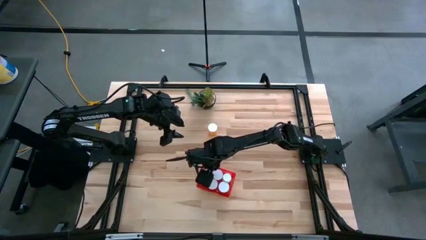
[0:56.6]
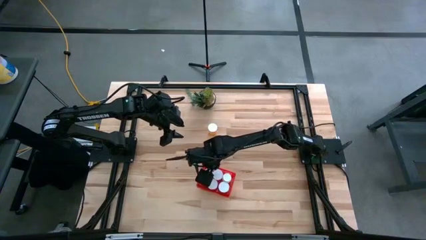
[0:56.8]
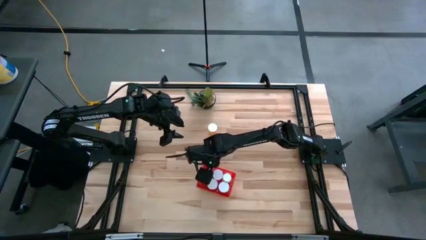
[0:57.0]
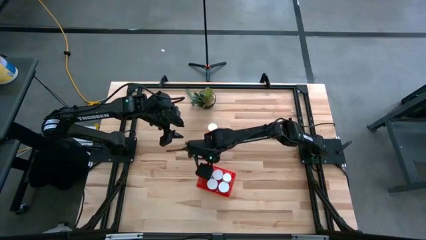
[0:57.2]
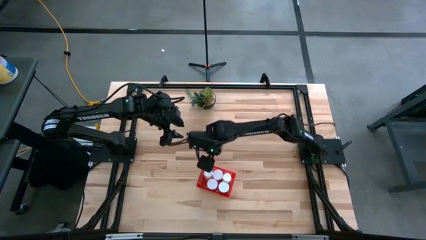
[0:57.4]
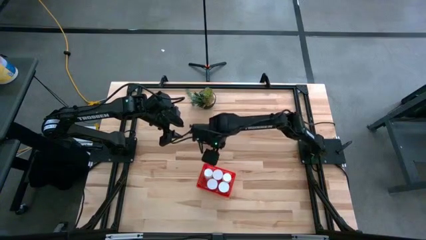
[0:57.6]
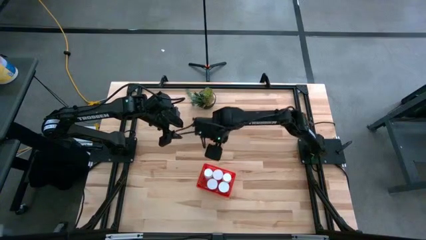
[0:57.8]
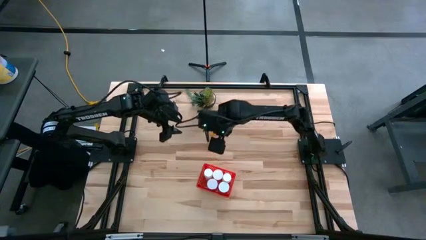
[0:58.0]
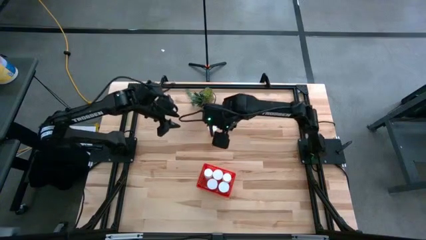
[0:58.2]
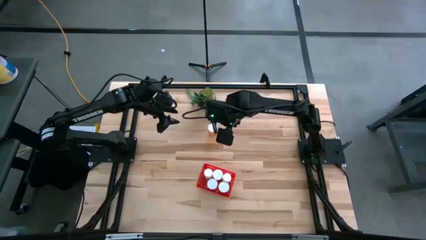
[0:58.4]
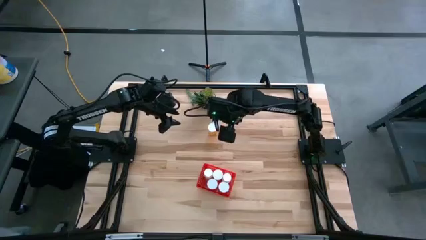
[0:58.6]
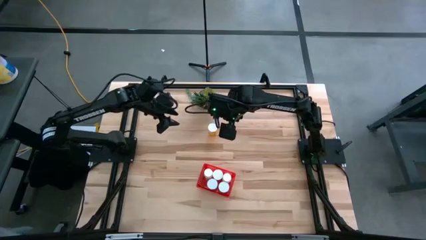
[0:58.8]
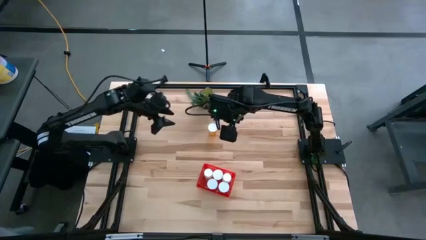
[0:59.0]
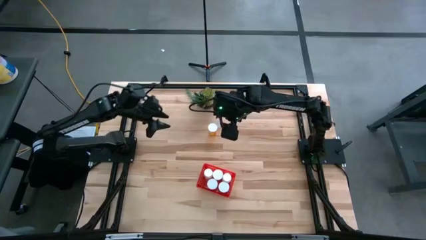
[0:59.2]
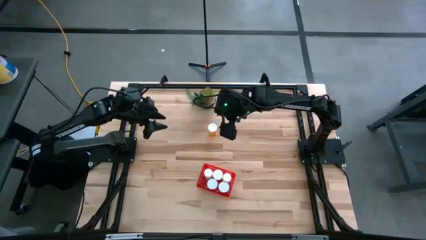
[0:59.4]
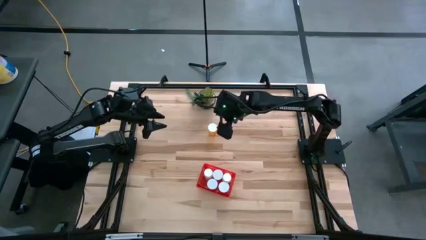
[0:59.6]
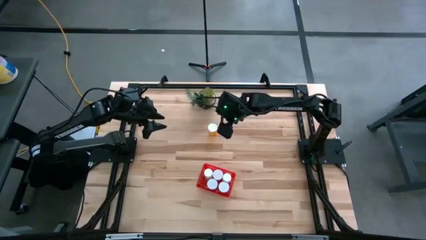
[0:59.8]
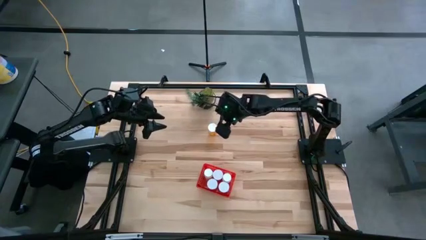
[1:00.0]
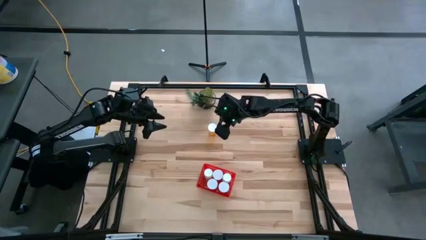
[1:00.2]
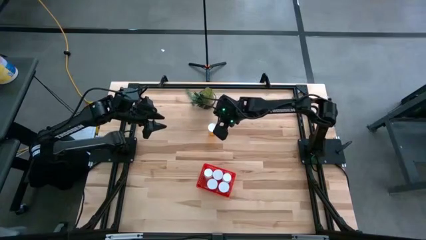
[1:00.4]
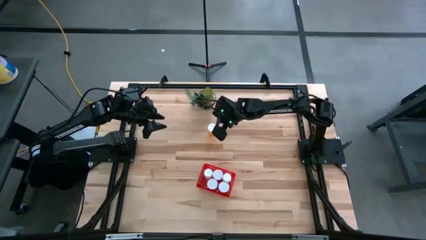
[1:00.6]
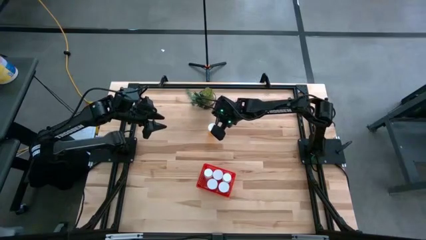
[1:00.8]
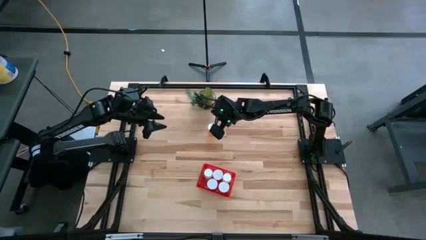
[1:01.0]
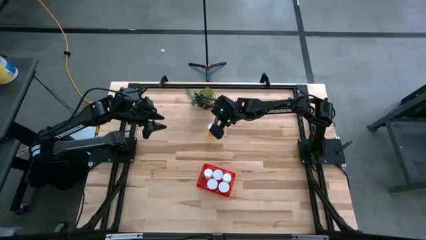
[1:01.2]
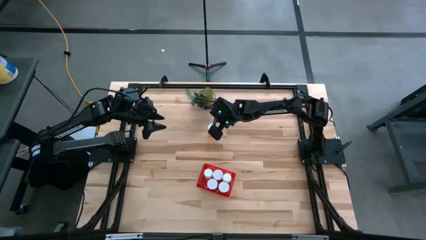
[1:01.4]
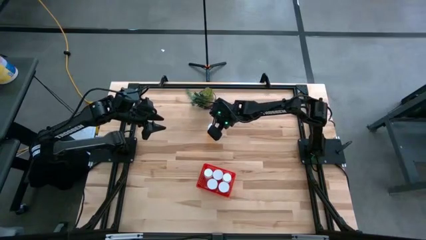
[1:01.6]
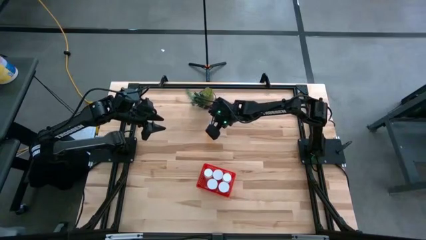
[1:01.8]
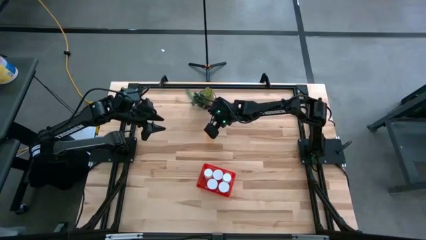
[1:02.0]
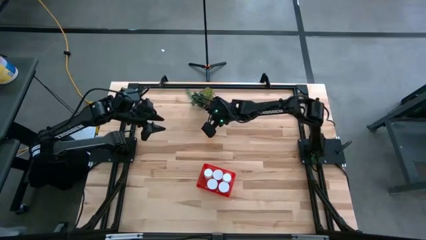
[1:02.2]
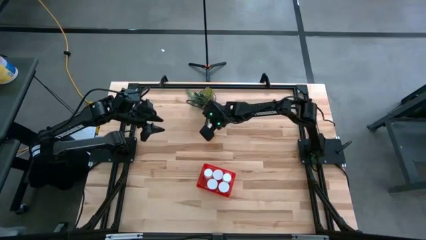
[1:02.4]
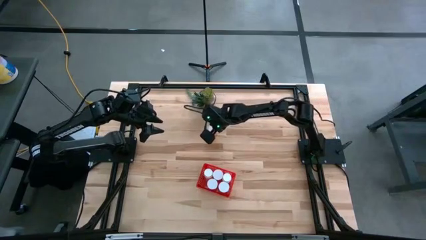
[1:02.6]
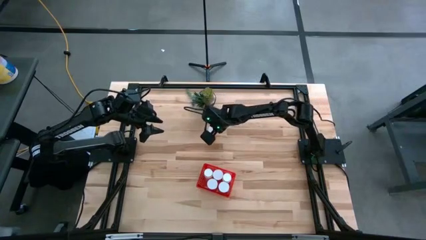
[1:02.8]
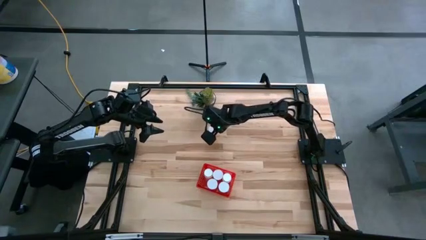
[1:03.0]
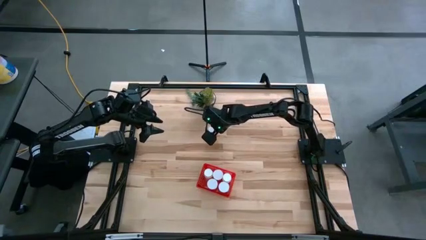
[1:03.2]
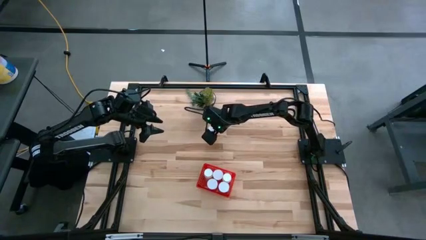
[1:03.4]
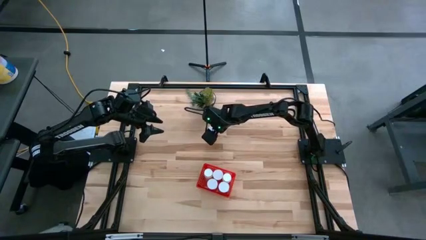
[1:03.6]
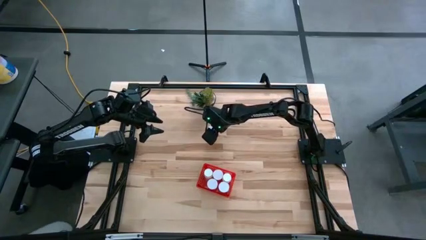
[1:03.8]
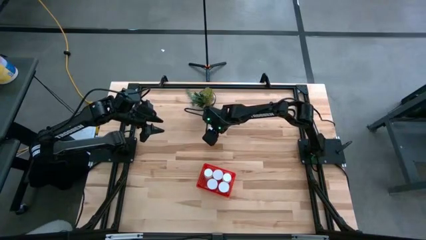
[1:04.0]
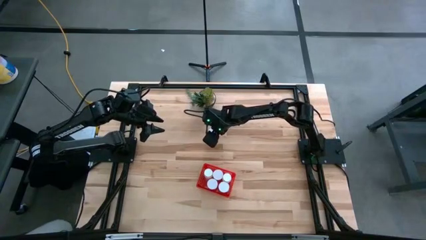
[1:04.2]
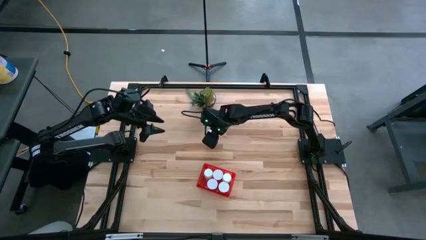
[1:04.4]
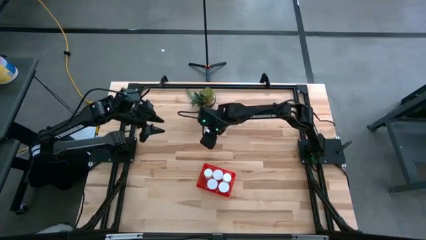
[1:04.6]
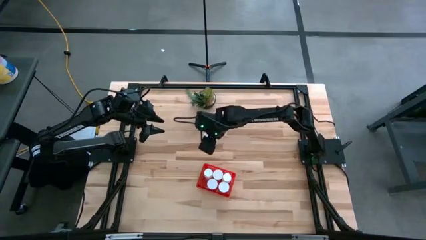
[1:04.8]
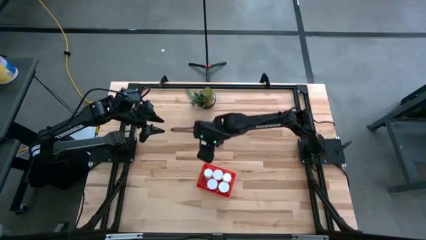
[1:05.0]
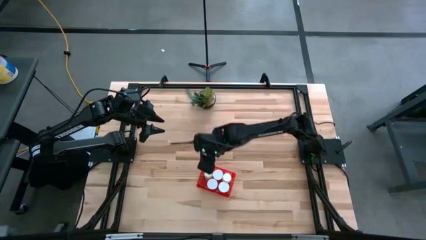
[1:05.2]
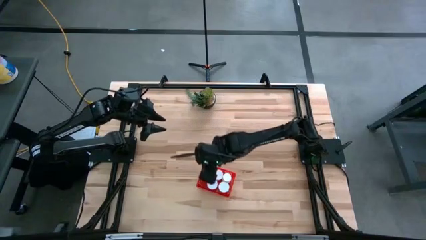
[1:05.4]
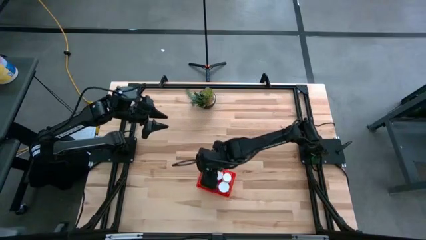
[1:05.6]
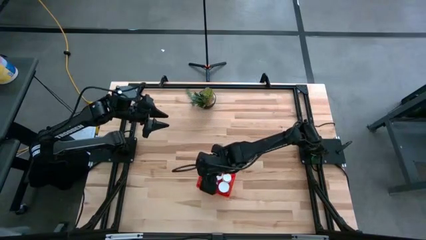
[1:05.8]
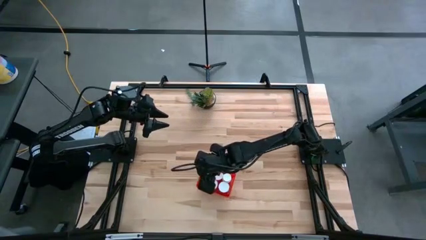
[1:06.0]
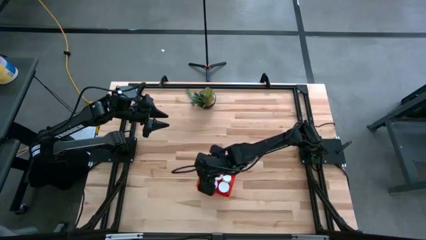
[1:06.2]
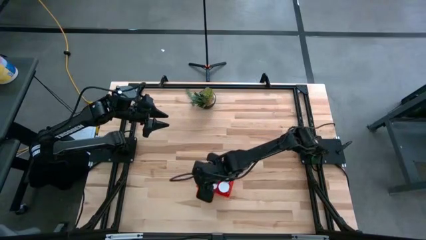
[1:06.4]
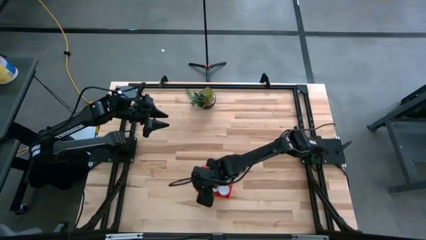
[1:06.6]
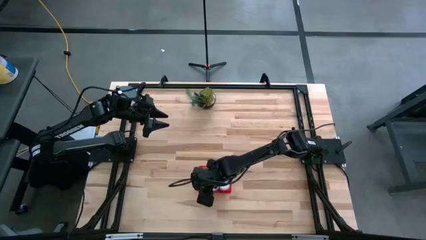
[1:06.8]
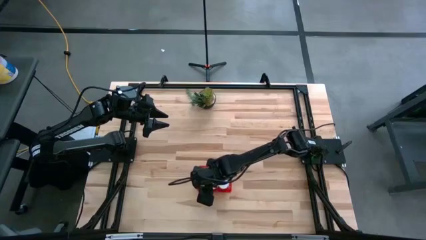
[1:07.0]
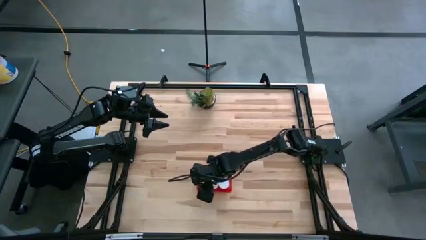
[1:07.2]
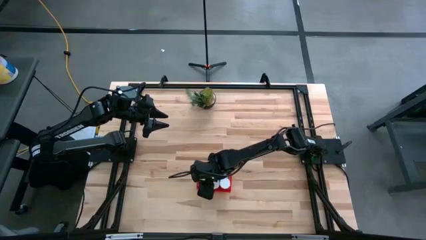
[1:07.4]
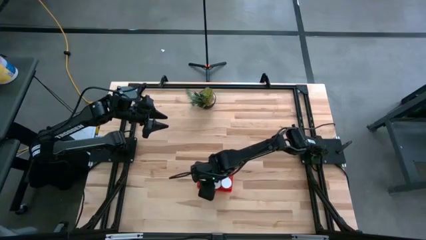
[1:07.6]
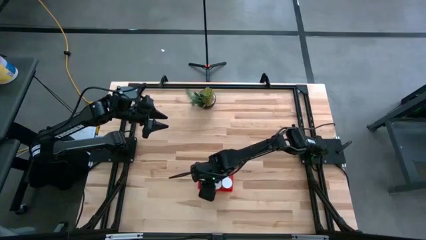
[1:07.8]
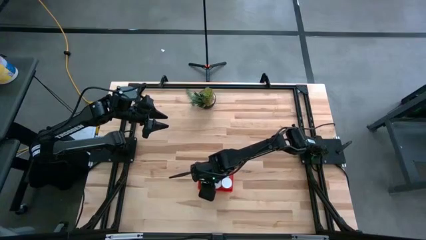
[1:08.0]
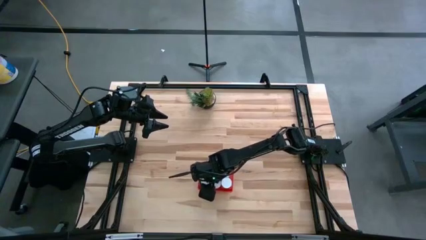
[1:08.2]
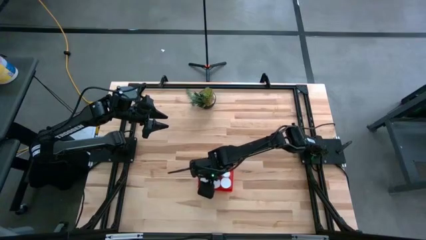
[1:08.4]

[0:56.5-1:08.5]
Task: Pick and place pill bottles into a basket
Put the orange pill bottle into the basket

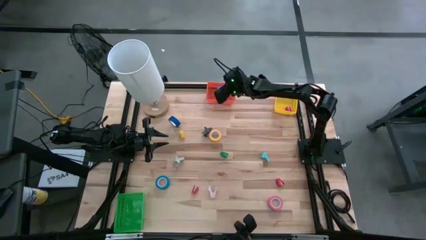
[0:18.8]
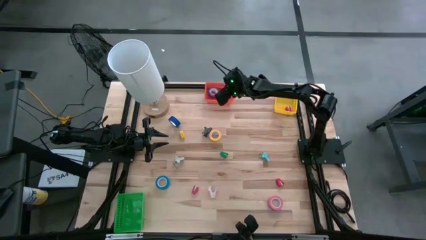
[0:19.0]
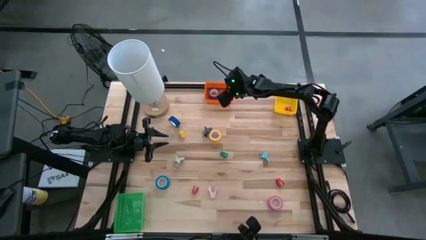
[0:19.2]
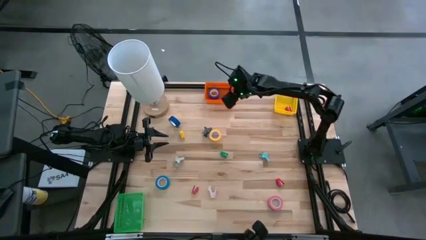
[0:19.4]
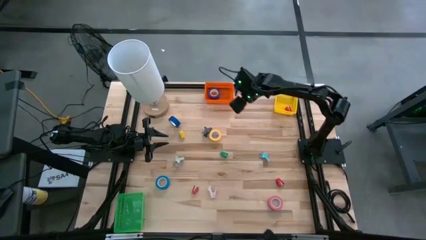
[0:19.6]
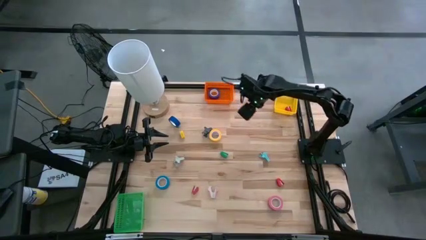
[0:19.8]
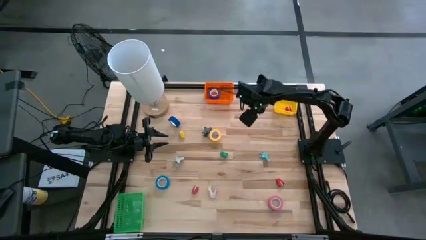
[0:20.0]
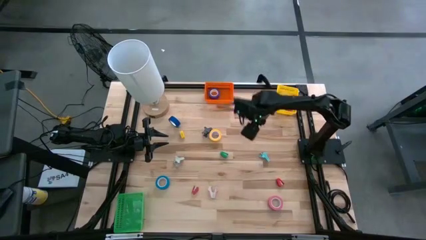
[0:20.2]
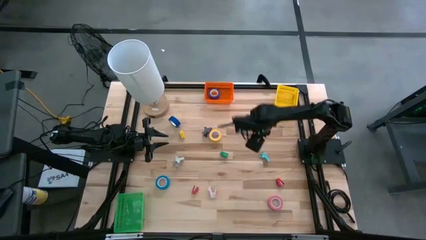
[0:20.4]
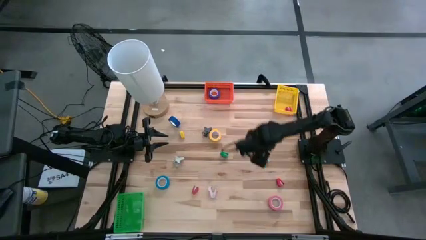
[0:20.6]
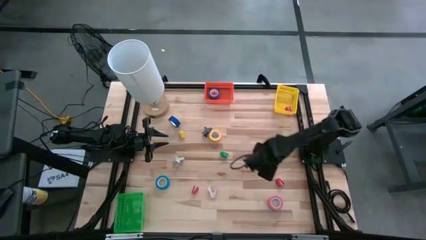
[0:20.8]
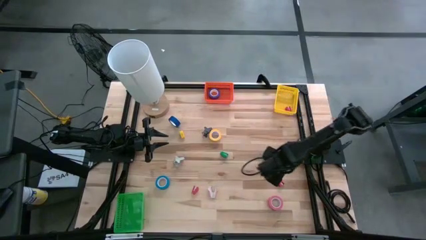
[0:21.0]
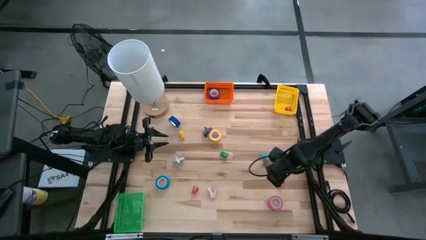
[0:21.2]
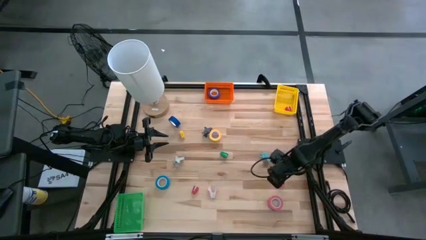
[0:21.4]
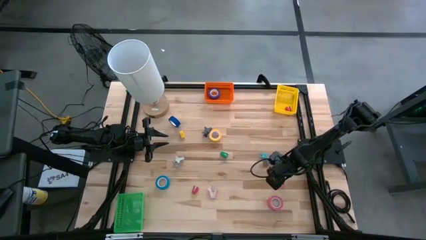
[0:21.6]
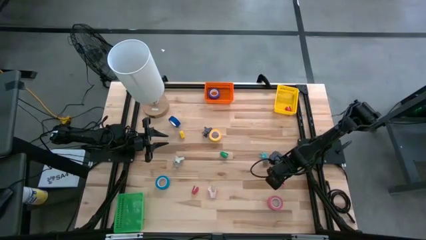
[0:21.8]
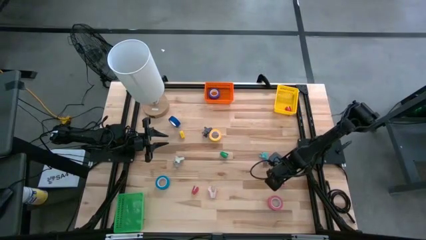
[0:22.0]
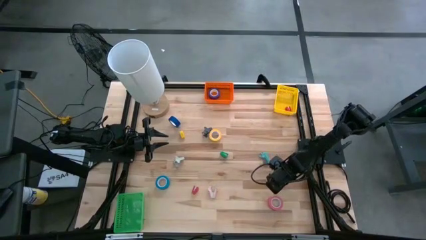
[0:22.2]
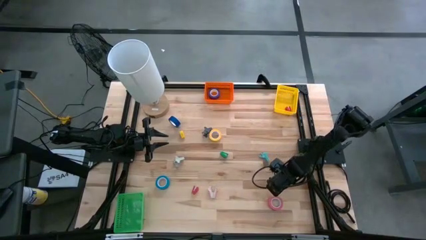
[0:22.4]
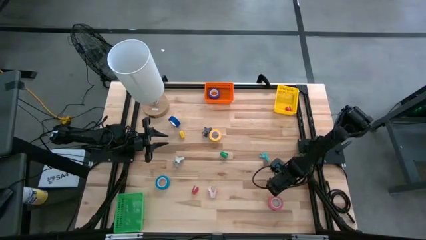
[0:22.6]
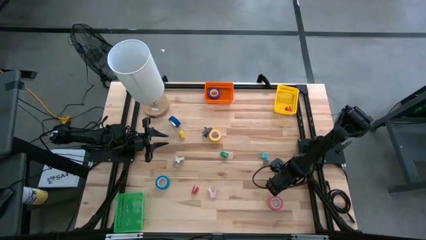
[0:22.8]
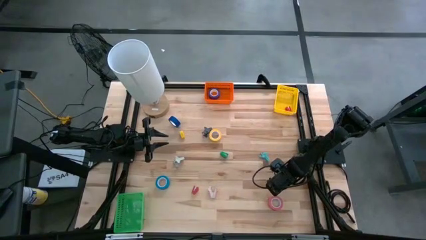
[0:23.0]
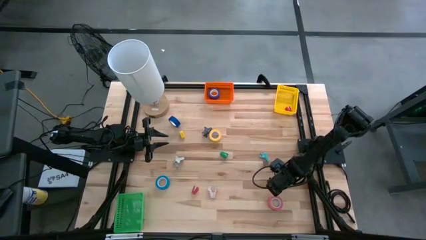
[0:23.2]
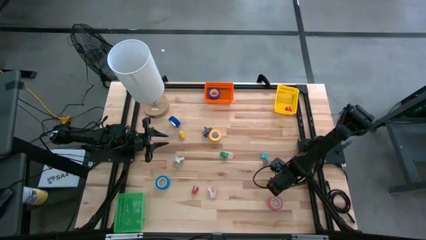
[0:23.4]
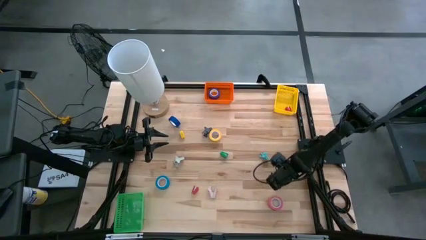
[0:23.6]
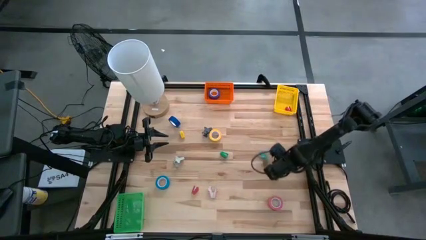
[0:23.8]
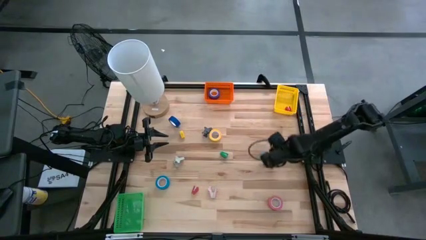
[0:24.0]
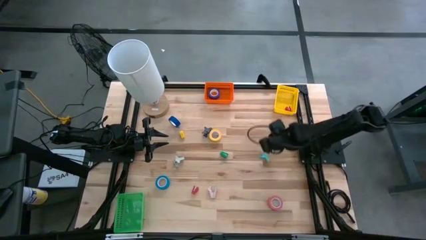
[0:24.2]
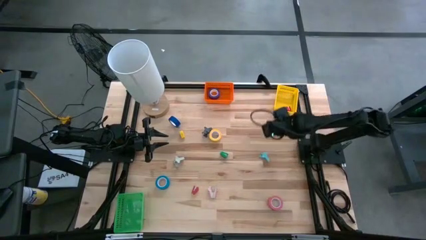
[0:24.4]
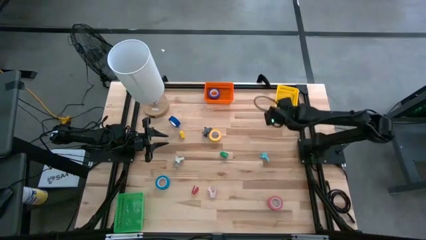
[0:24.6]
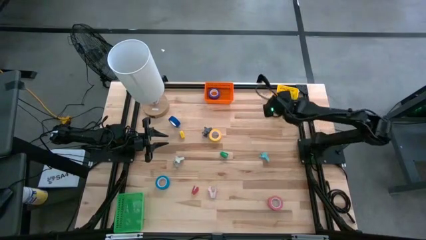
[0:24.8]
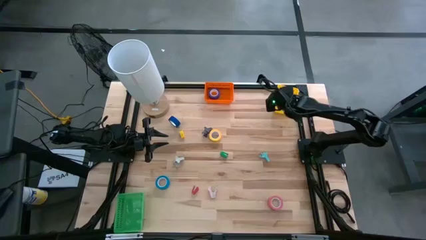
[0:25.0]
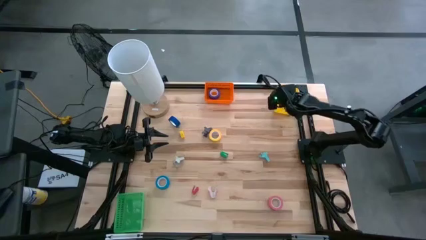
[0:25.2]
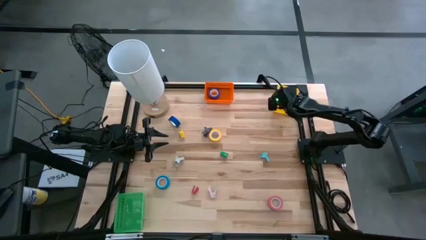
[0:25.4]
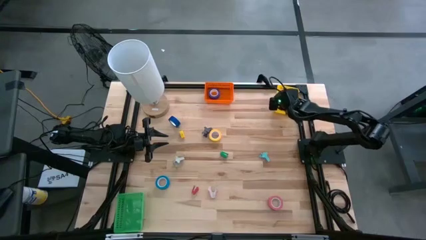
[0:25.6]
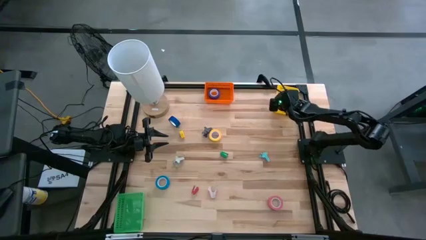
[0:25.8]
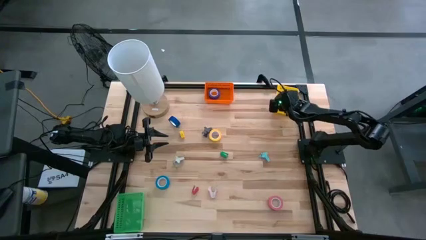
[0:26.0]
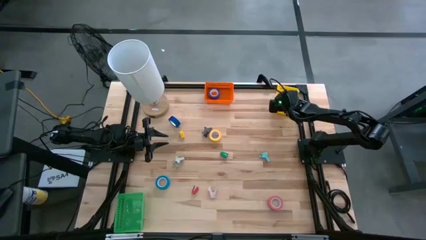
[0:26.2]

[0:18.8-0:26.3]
Task: Pick and place Stapler, Stapler remover, tape
Put the right mini red stapler into the yellow bin
